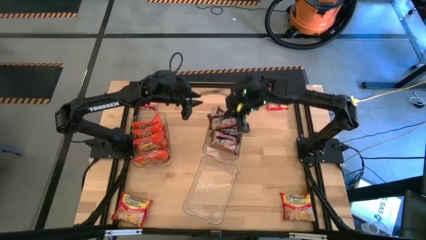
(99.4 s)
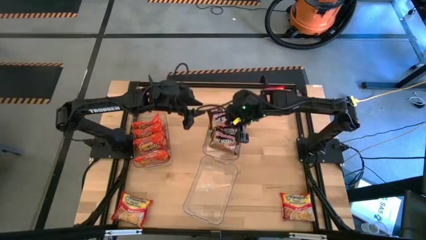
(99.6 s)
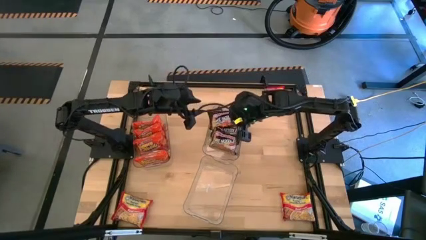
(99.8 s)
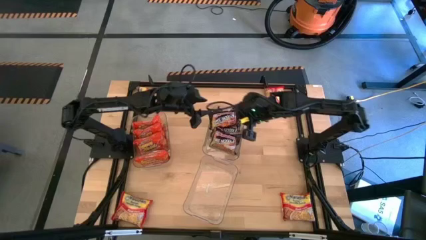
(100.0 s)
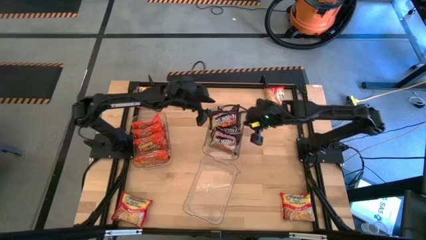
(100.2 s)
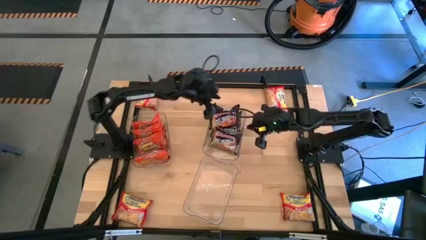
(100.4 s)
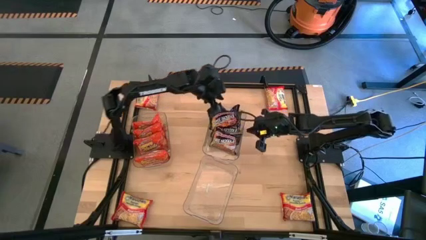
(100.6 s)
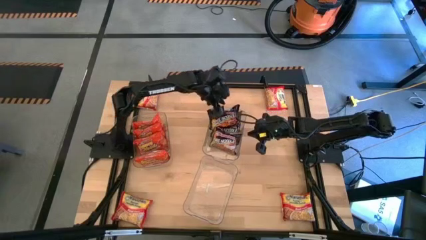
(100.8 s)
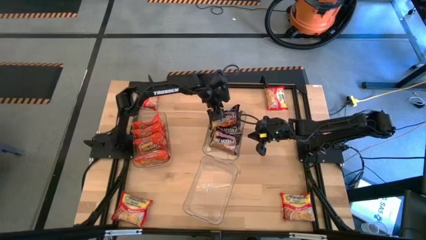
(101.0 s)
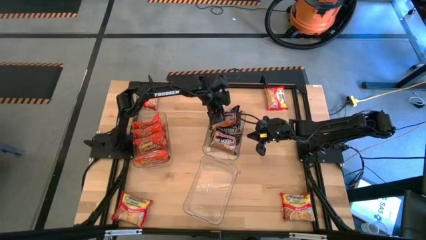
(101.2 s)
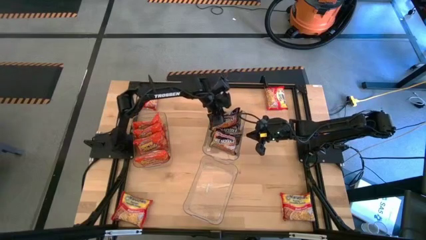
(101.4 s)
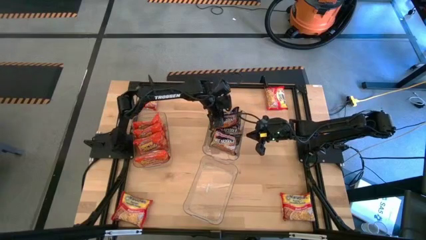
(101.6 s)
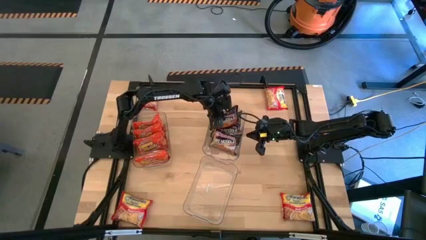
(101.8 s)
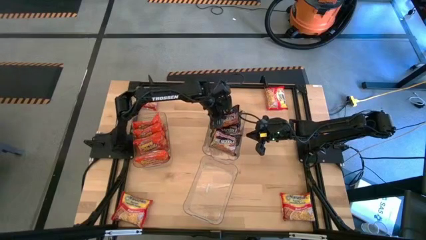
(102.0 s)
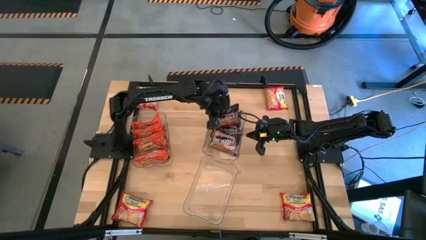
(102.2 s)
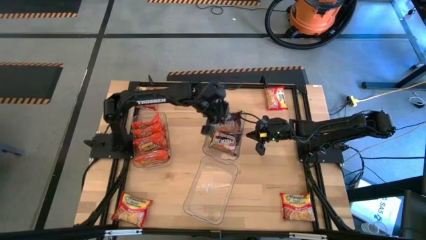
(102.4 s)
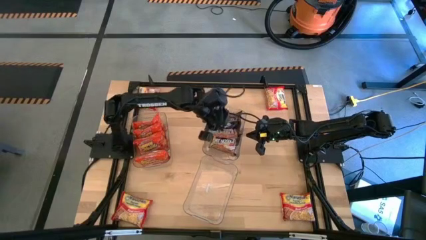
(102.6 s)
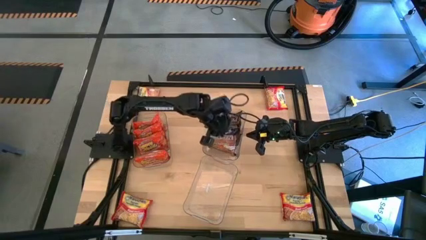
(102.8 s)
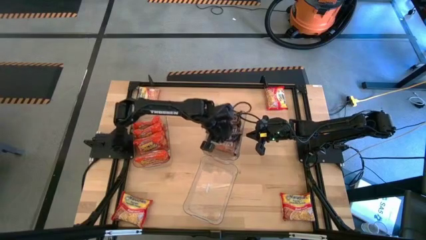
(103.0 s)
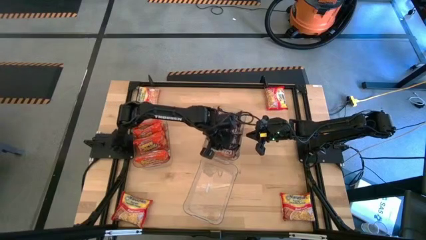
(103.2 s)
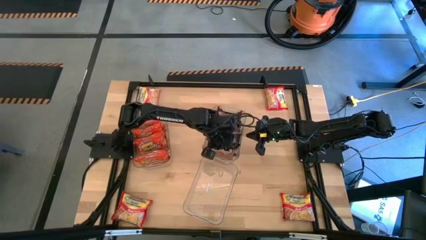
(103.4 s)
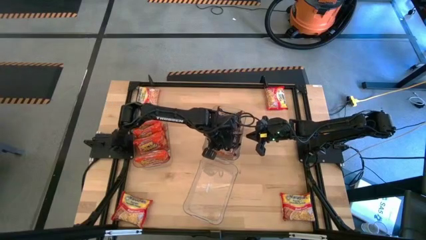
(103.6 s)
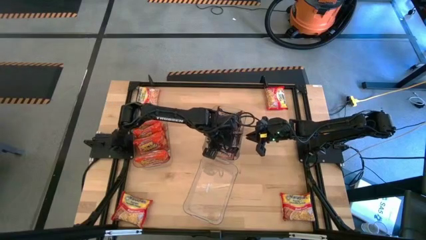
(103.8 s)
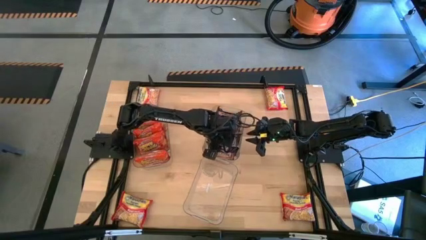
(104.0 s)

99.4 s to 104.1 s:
Task: Sort Maruchan noodles
Put the black noodle pack into the top right transparent bin

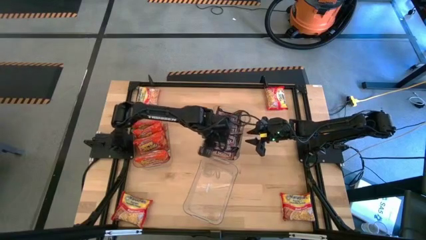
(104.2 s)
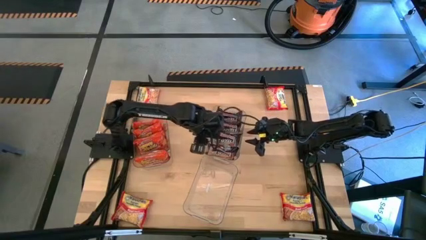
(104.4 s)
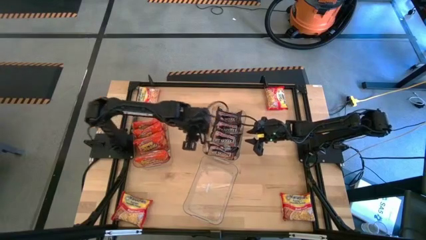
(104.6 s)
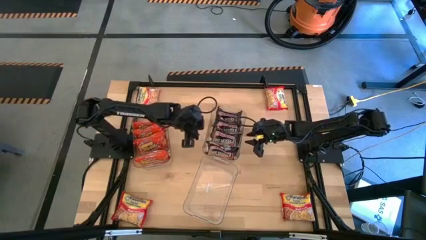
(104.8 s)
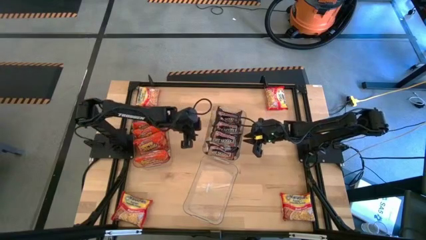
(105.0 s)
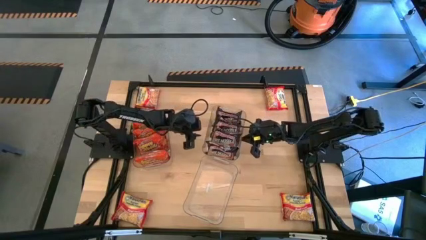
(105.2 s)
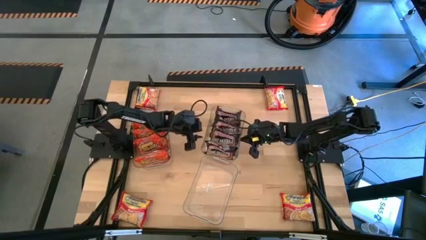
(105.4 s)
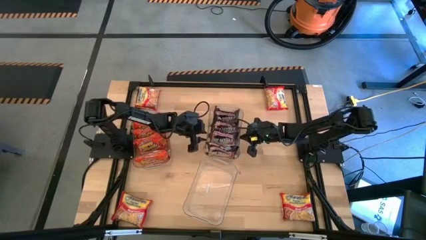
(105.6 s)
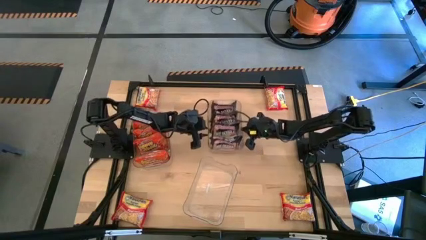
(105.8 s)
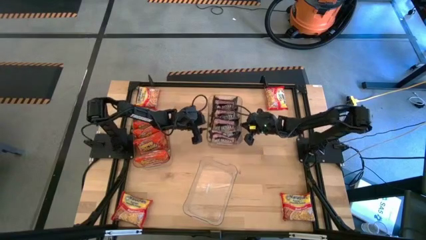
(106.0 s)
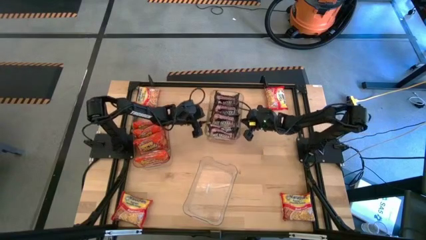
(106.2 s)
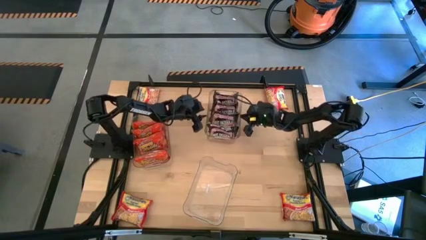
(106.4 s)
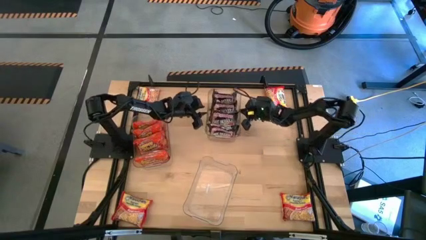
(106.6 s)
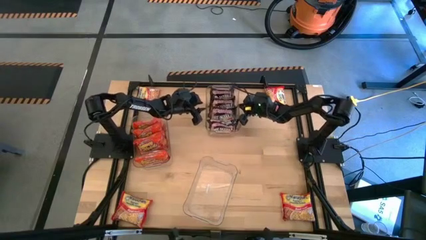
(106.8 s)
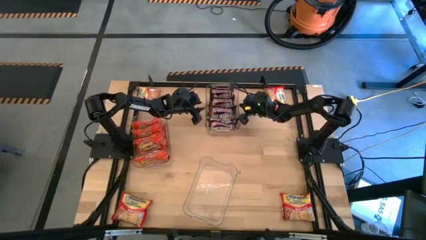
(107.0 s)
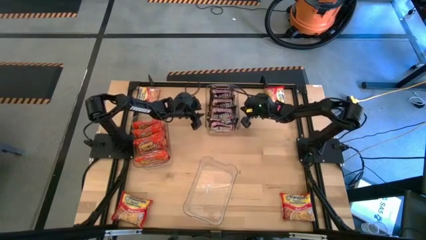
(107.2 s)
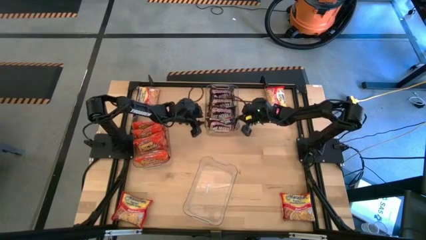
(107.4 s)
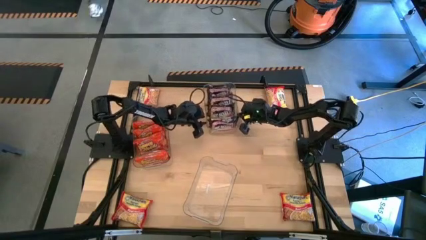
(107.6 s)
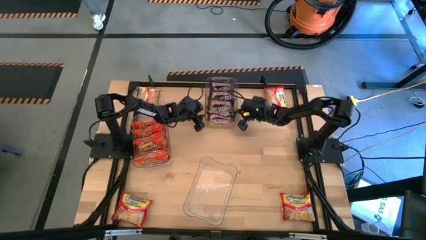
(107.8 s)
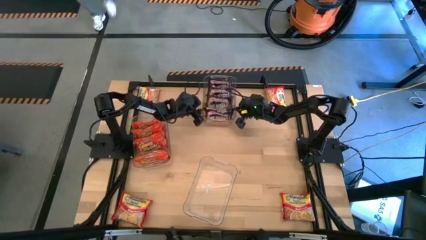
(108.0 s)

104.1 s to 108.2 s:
Move the top right transparent bin to the top center of the table

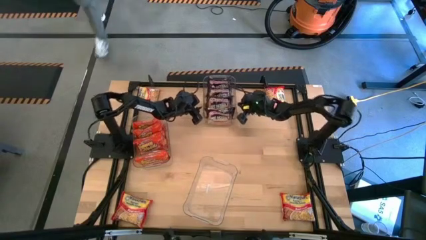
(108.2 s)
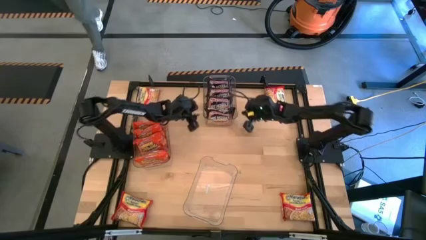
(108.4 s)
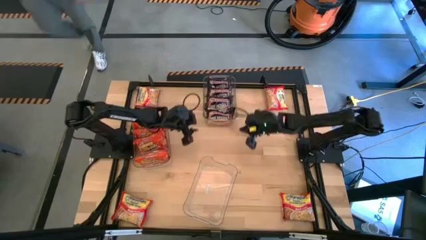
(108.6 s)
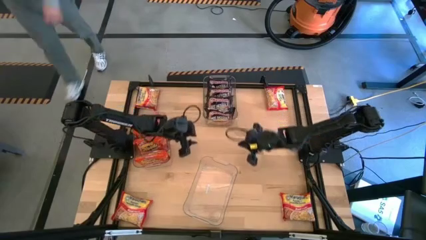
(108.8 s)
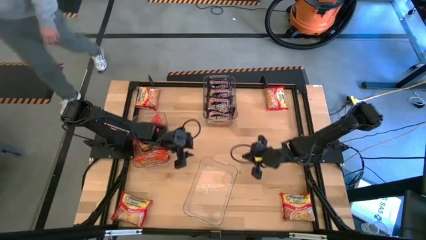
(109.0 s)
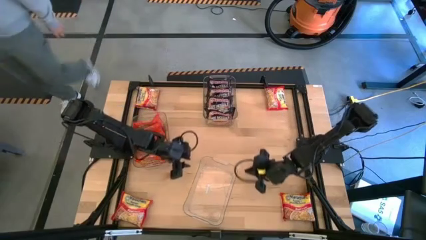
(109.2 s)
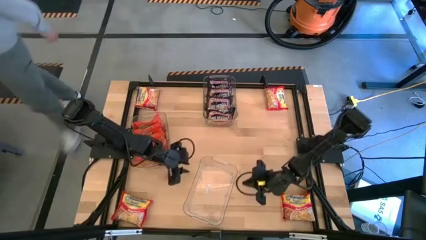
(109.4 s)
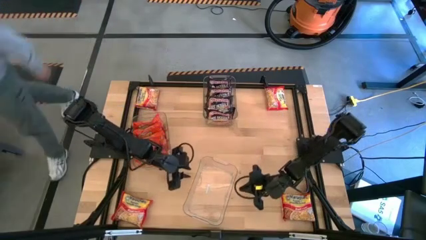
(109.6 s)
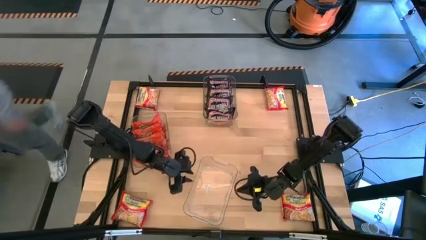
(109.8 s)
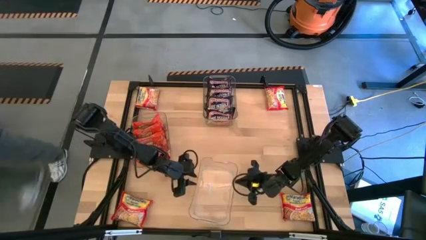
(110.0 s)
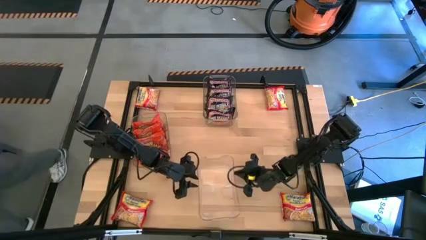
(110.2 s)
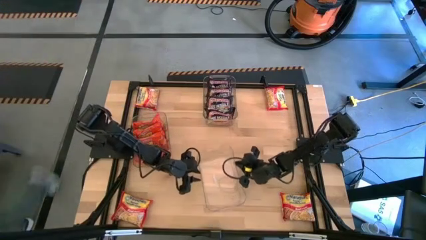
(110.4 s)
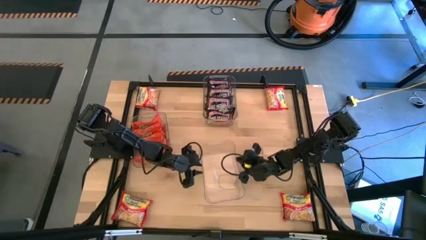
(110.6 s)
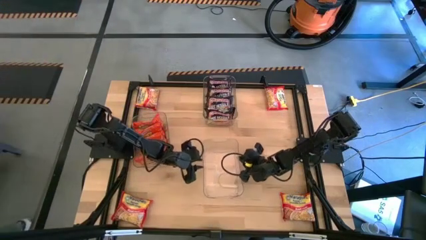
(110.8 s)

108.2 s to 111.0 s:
Adjust the bottom transparent bin

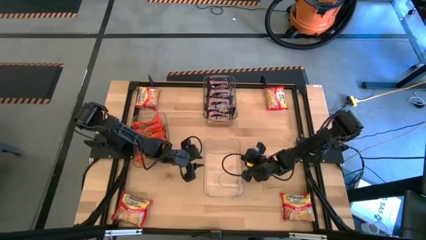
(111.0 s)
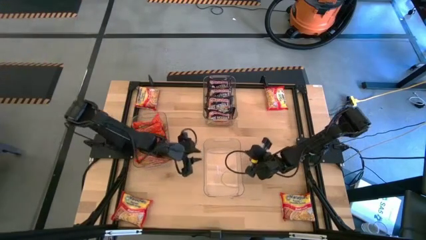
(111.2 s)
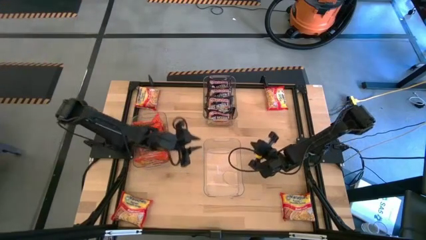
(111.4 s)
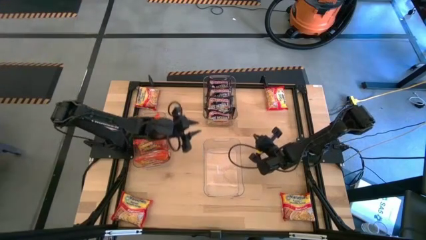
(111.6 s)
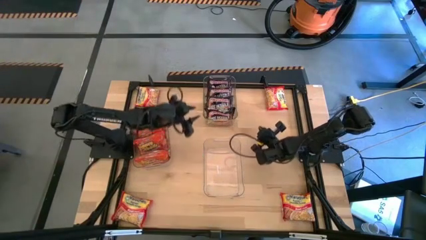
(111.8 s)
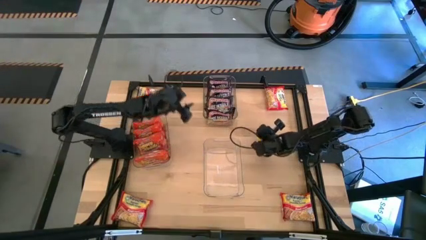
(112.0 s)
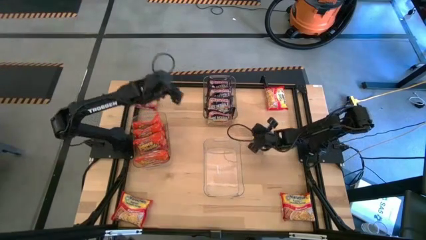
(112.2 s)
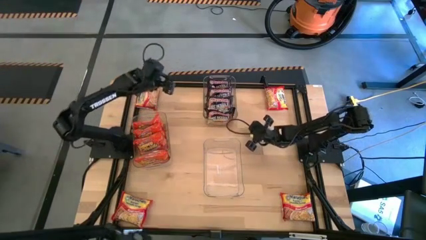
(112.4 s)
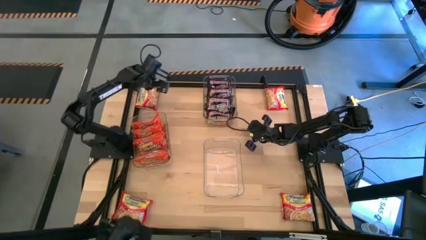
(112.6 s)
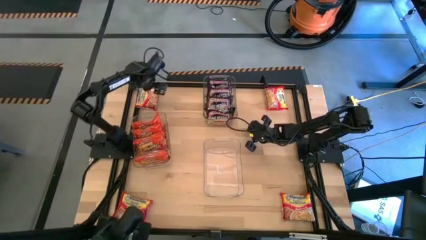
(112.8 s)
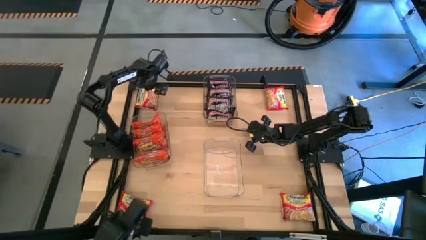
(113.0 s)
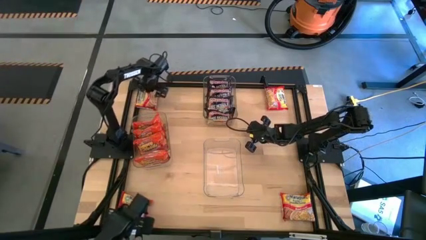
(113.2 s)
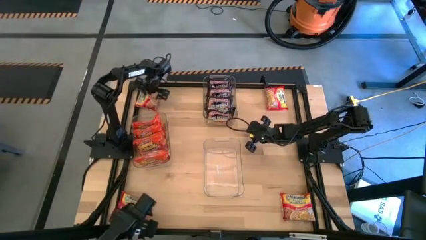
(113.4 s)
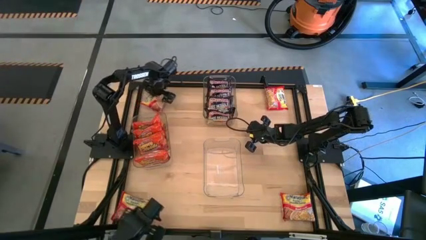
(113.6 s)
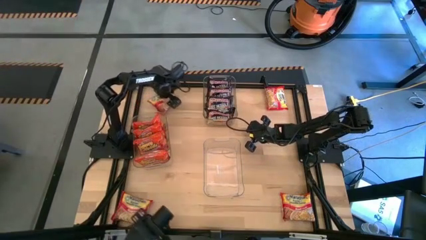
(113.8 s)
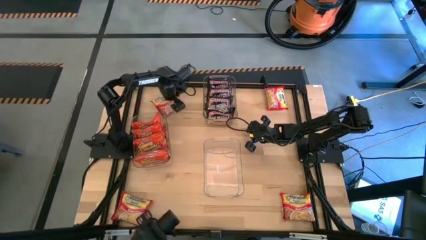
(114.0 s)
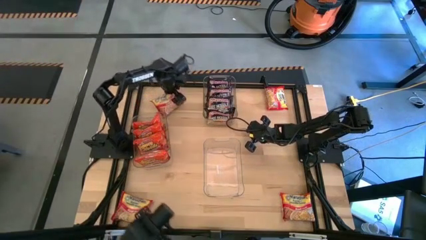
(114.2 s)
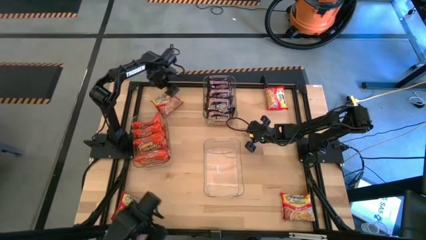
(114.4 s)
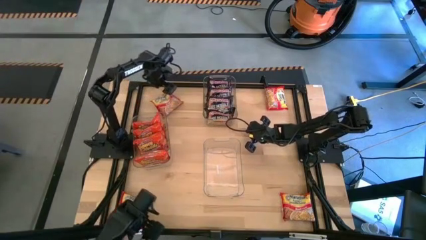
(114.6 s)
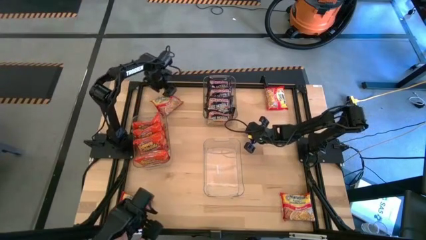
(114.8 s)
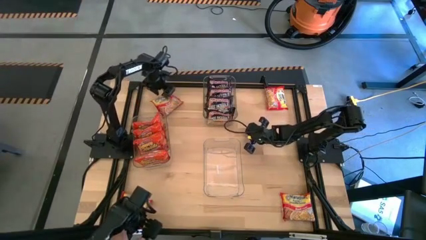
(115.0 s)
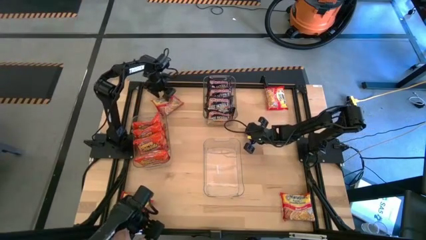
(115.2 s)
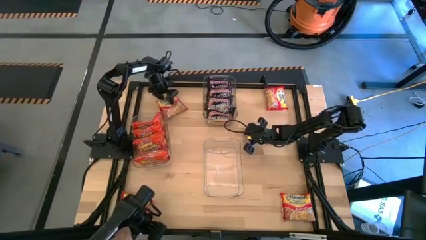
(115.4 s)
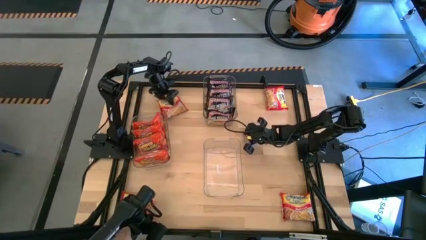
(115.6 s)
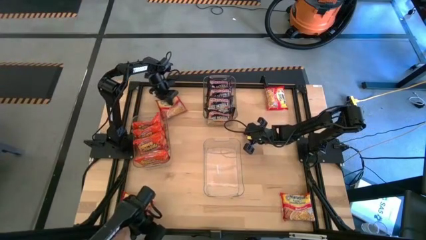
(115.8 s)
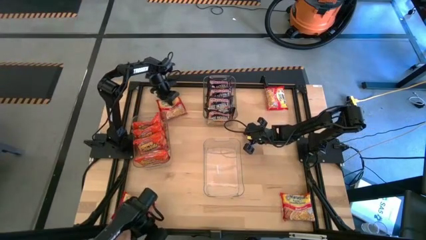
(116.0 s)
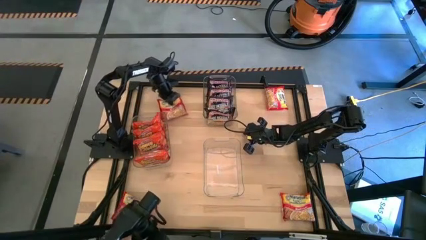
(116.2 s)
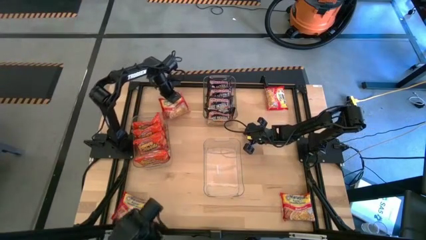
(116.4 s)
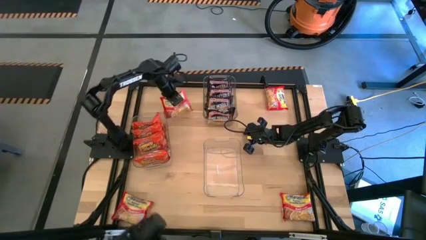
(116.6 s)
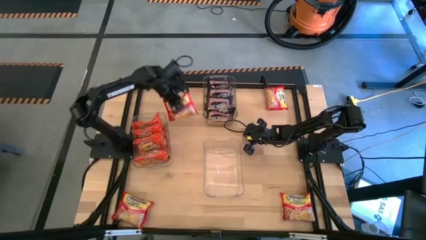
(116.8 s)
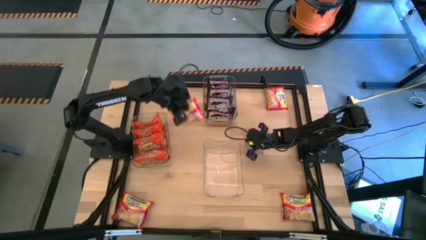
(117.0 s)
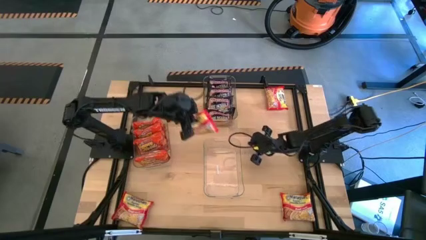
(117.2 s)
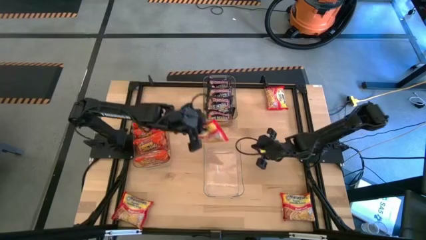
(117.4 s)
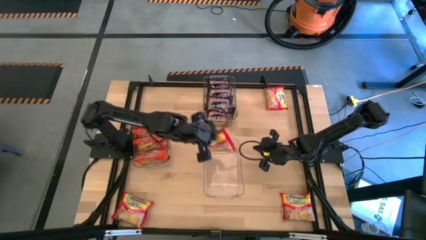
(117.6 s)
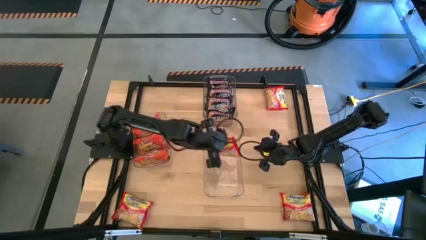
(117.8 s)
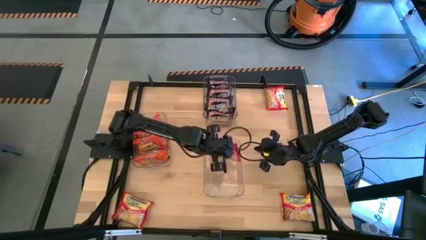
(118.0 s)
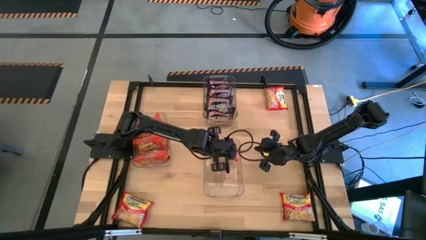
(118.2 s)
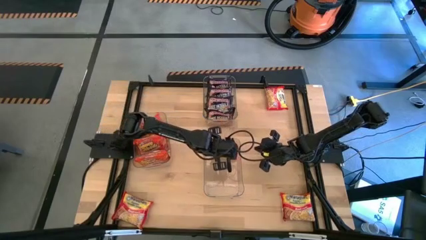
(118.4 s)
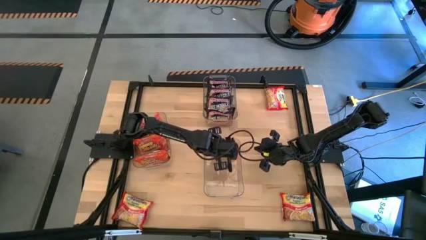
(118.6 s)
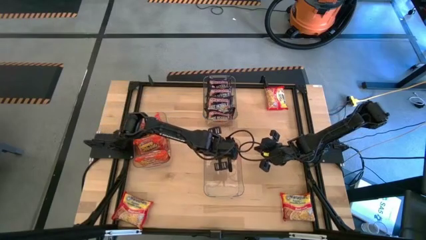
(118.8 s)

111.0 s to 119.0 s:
Put the red noodle pack into the bottom transparent bin
